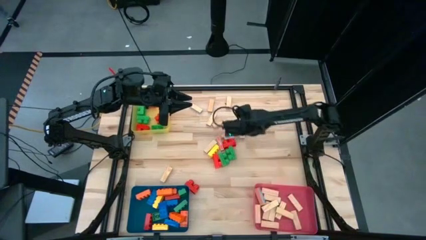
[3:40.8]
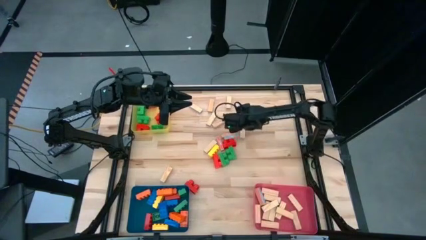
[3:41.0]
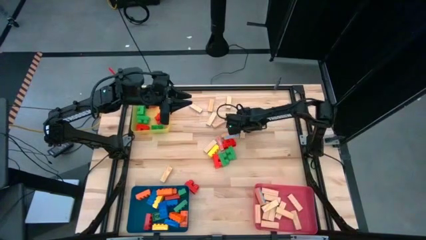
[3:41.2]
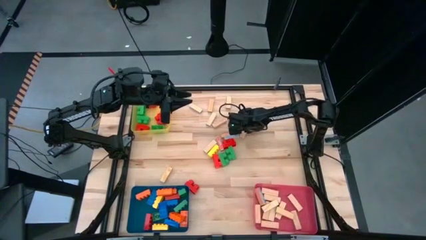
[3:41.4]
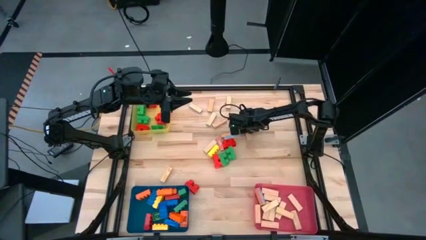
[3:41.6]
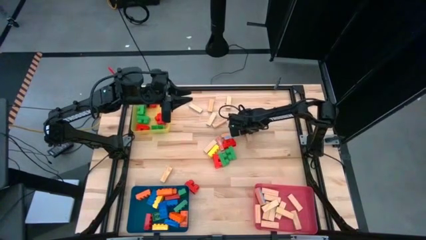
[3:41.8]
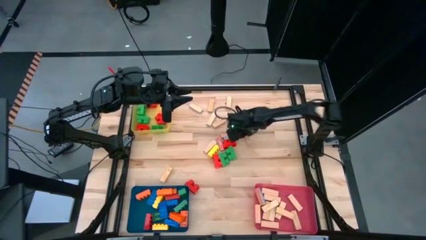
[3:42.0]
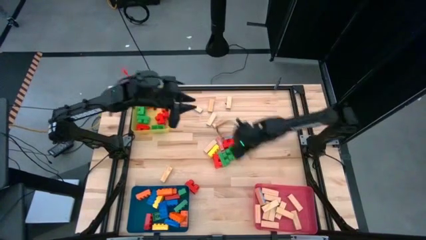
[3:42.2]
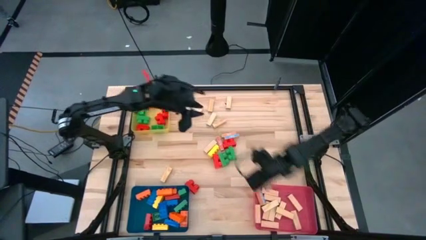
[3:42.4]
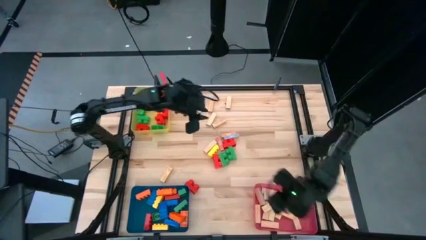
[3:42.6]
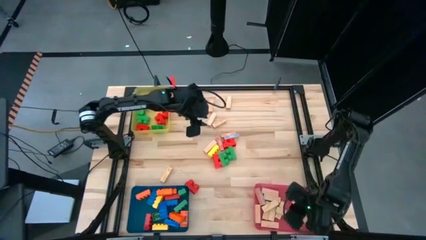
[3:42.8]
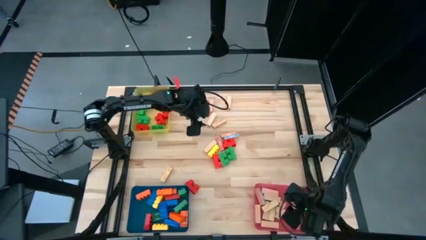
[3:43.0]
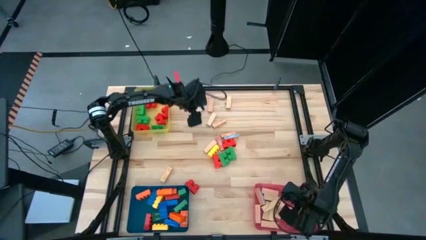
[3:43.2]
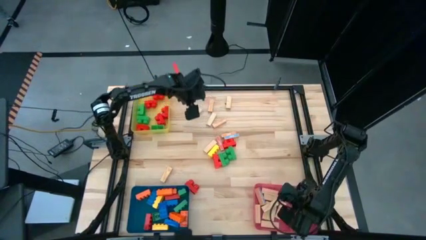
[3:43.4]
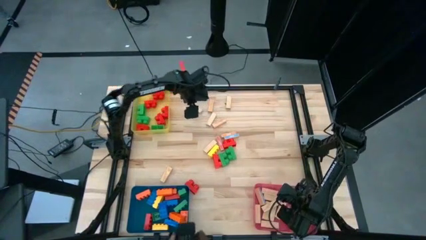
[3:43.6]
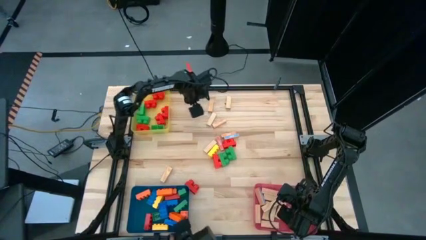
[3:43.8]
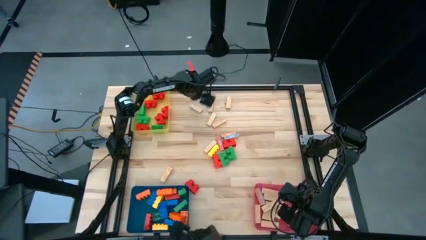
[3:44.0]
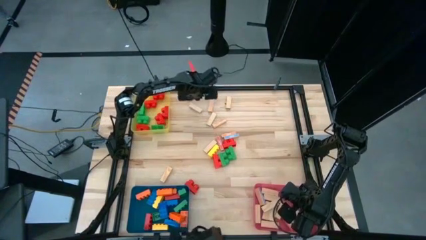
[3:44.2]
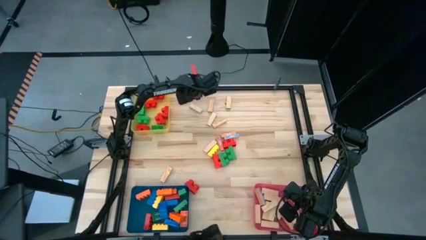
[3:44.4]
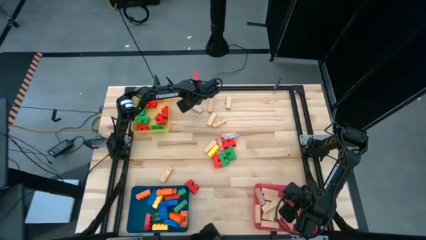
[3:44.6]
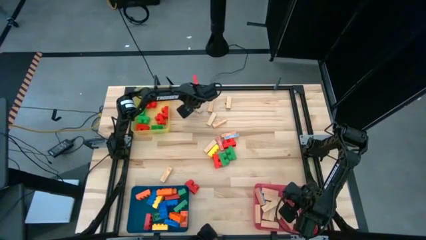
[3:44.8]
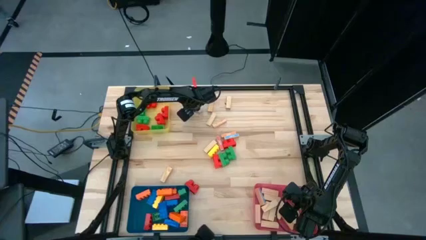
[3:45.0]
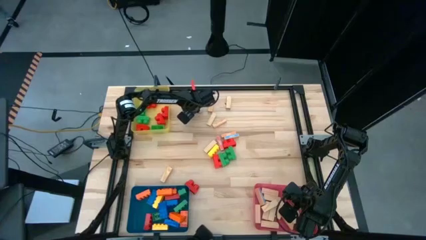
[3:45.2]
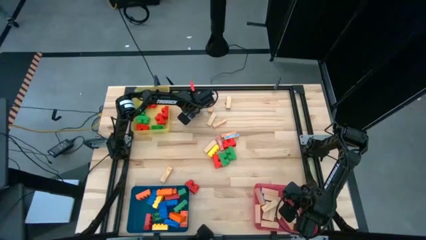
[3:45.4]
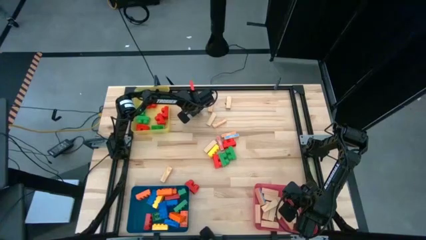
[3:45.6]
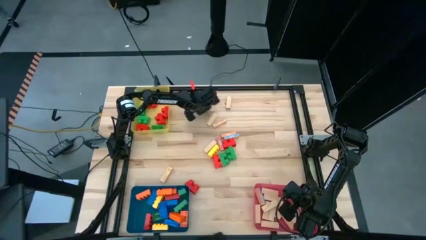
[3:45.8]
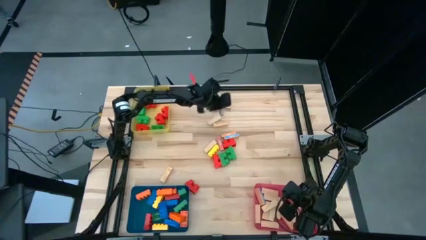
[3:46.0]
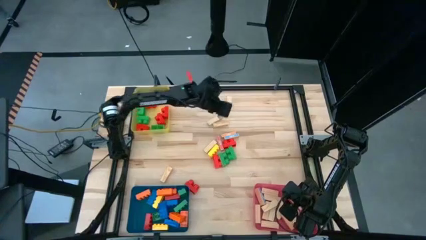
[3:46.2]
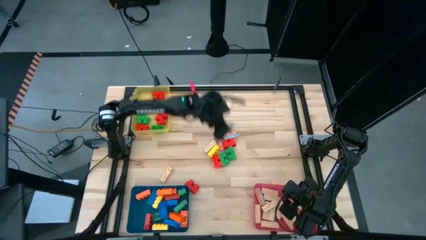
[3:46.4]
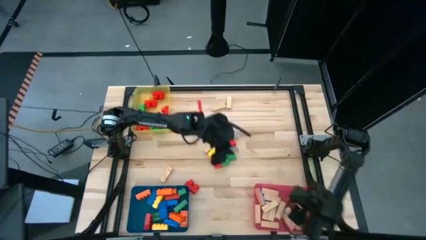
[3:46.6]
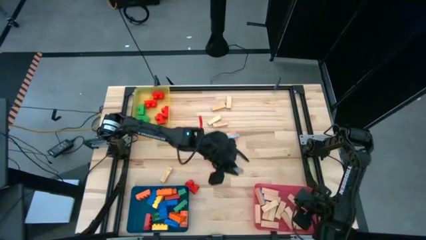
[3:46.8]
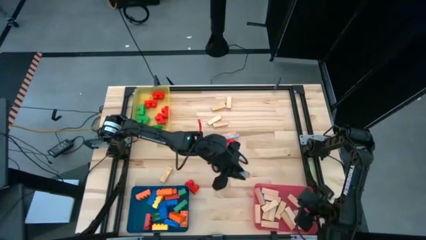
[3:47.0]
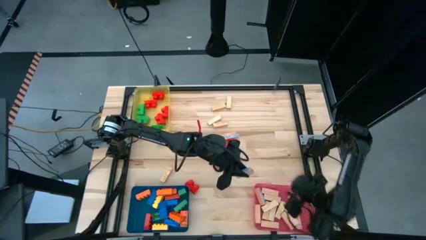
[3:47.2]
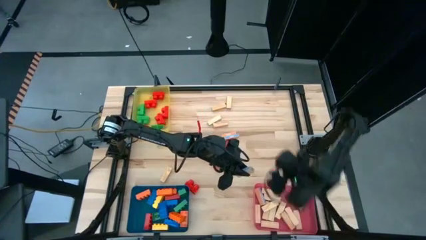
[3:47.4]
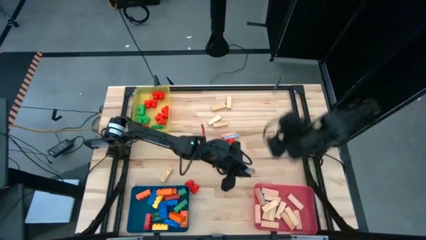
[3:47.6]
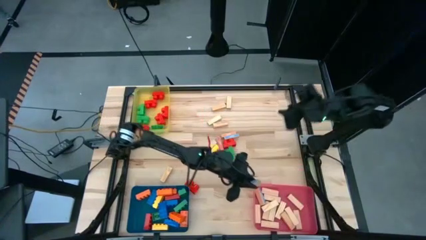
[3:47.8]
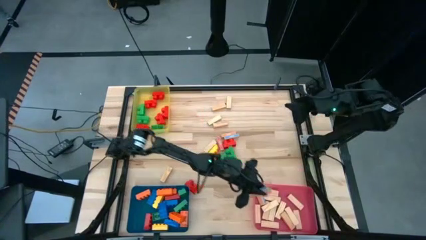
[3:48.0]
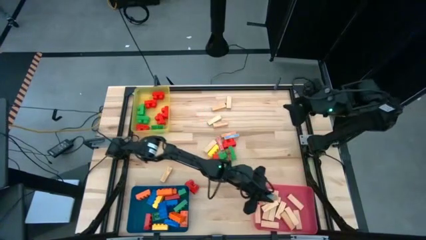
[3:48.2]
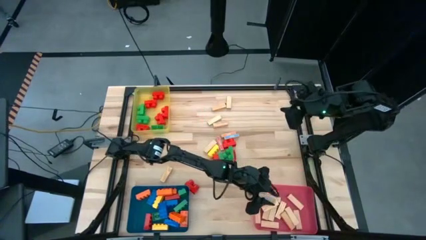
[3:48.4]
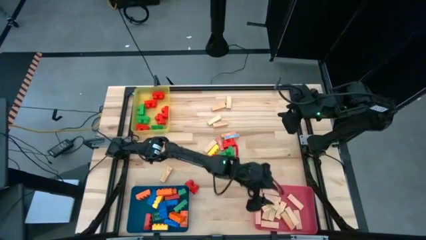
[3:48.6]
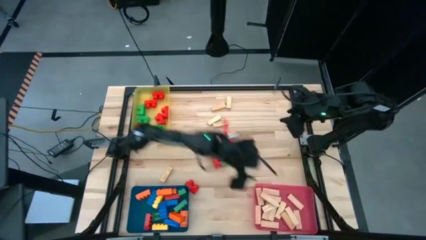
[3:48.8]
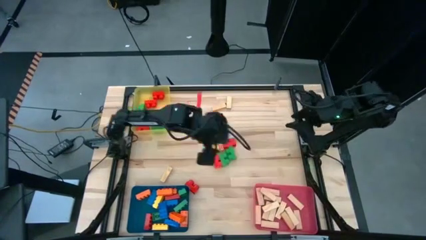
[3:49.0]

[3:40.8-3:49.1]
Task: Sort blocks by size
Put the wooden block into the red bin

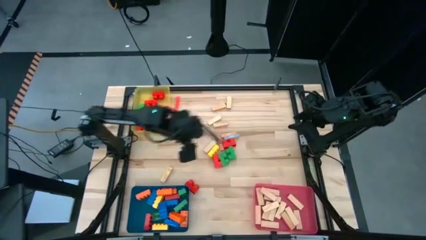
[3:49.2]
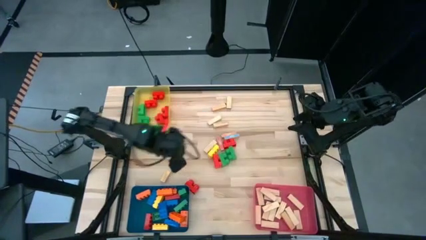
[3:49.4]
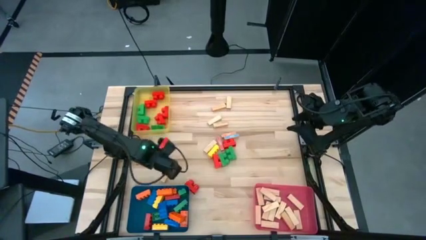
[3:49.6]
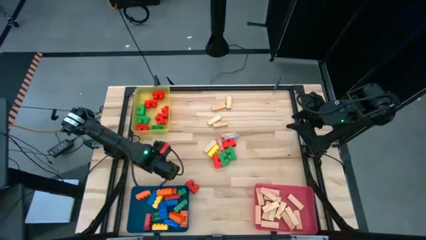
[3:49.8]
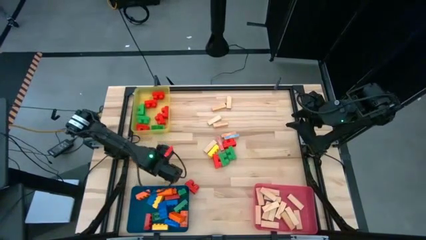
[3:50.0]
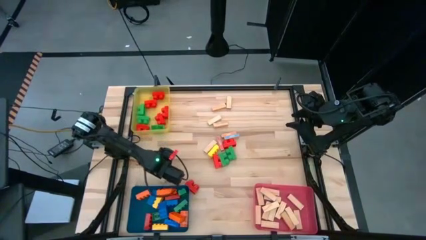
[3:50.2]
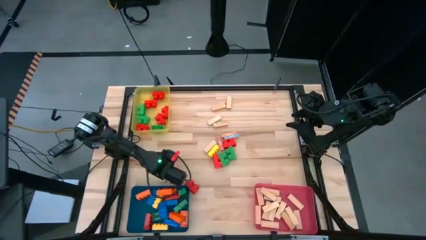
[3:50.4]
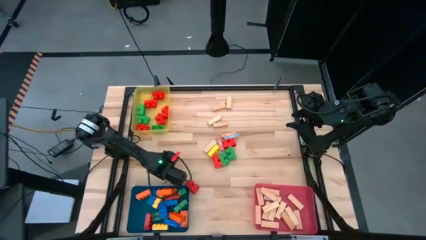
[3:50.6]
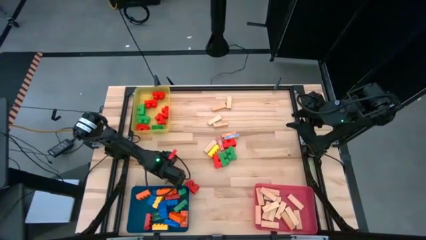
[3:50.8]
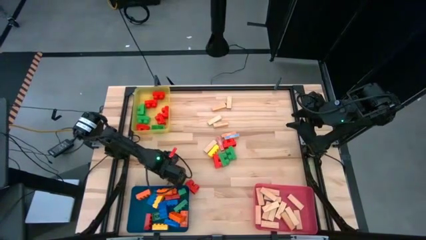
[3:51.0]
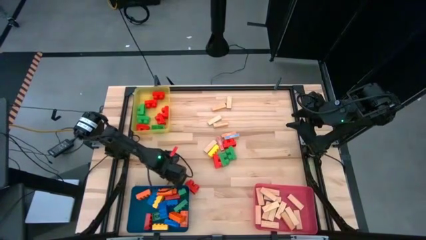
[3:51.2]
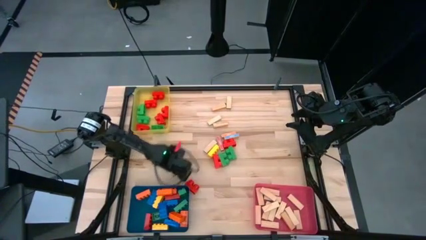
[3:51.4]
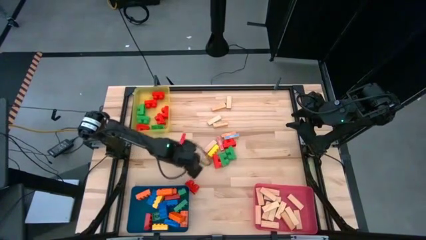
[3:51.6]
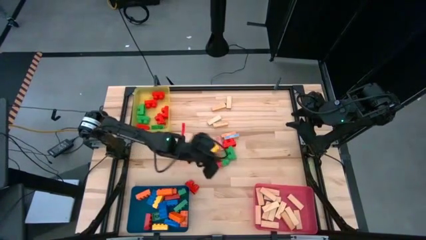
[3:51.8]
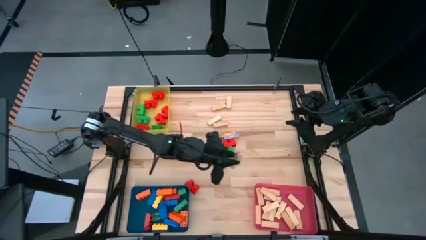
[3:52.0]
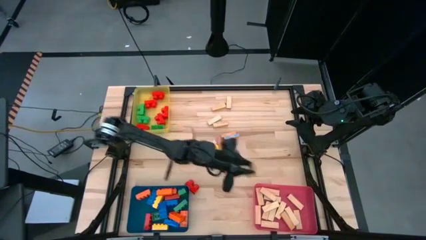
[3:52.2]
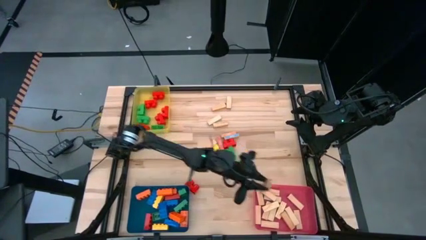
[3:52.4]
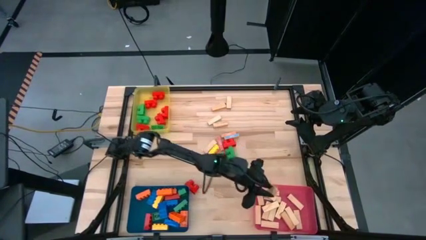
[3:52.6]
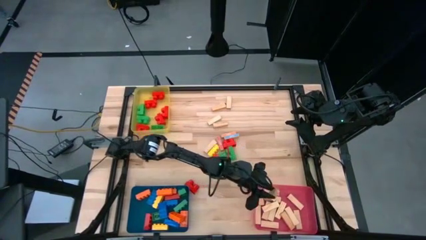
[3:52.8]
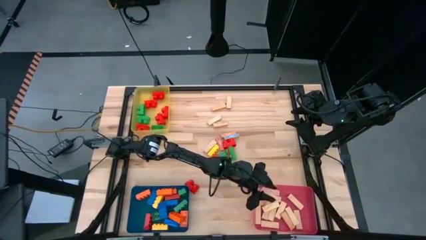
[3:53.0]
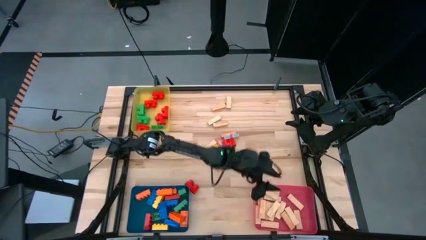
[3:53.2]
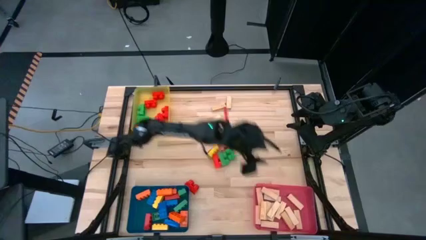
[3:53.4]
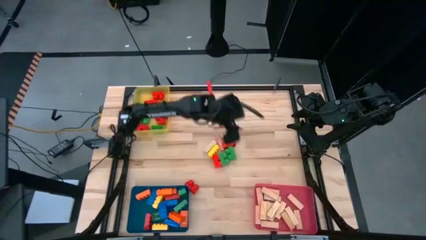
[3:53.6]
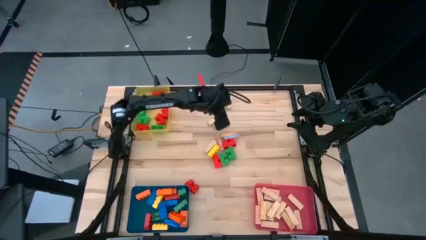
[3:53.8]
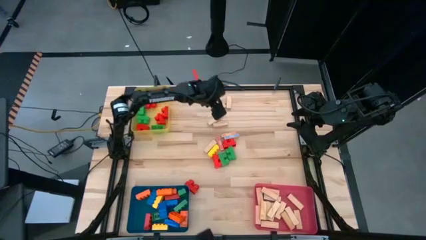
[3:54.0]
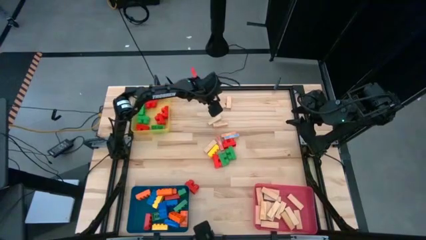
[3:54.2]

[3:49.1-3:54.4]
Put the wooden block into the red bin

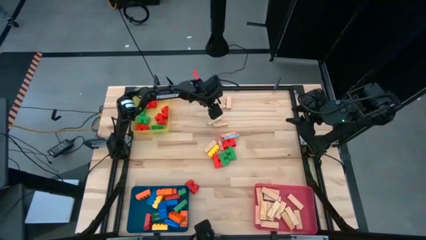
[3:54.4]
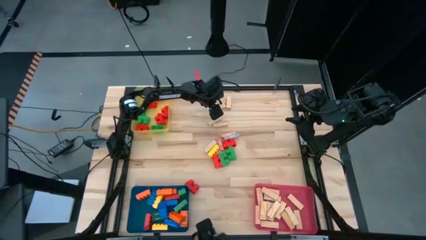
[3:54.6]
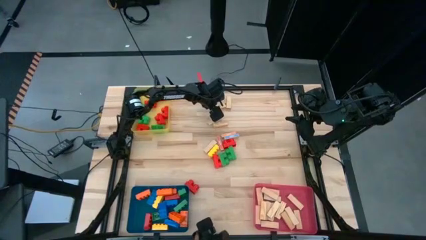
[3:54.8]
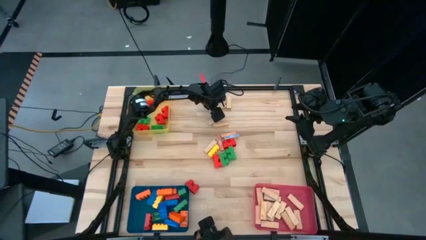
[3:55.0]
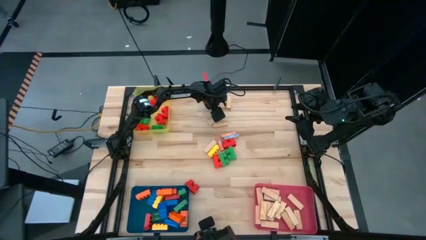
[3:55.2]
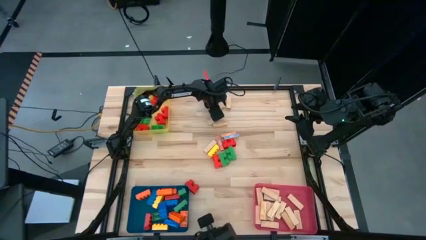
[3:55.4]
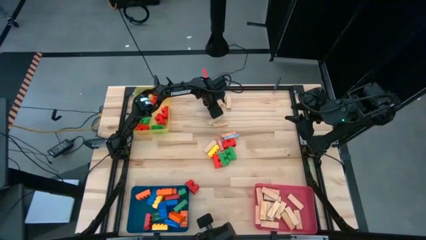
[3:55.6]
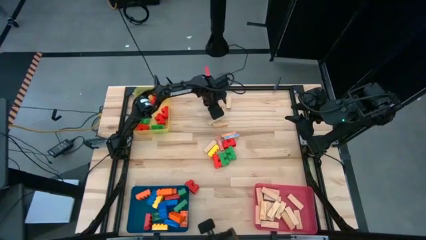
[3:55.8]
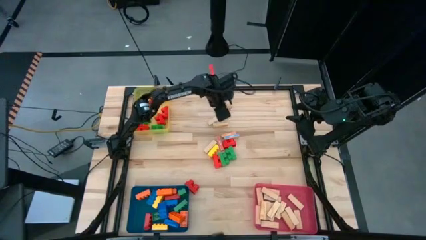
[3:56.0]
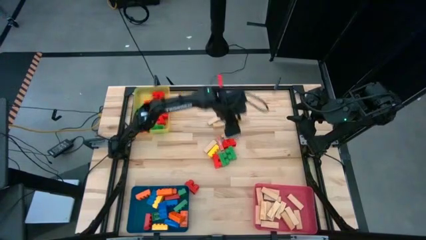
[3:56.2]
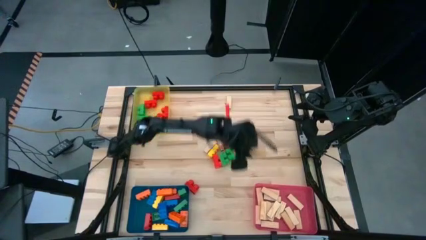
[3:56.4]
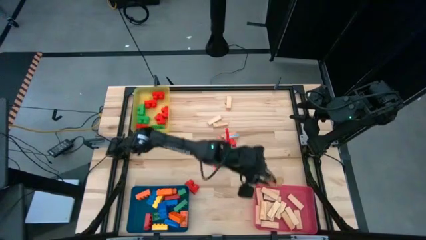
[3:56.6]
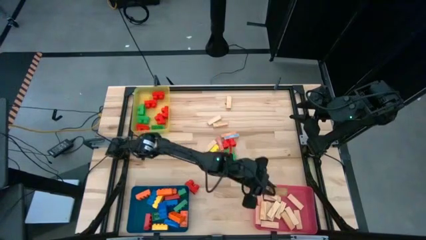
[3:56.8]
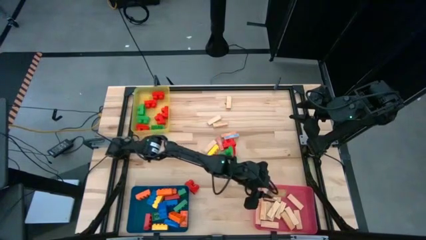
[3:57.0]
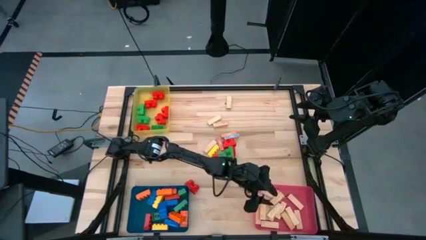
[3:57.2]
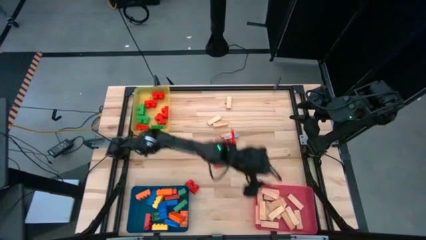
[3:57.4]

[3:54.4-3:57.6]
Put the wooden block into the red bin
